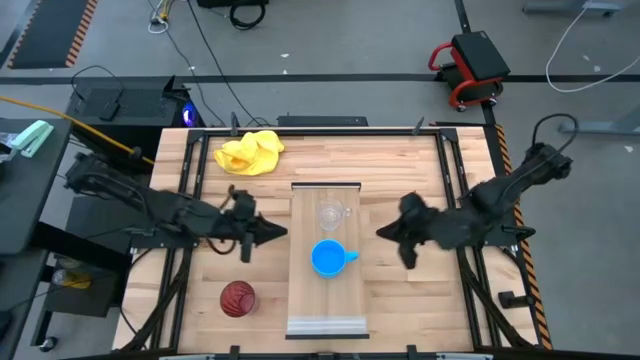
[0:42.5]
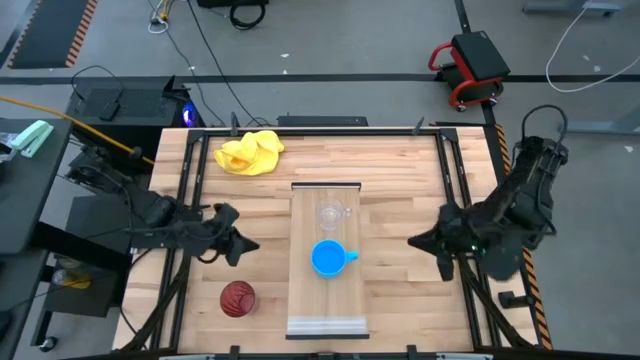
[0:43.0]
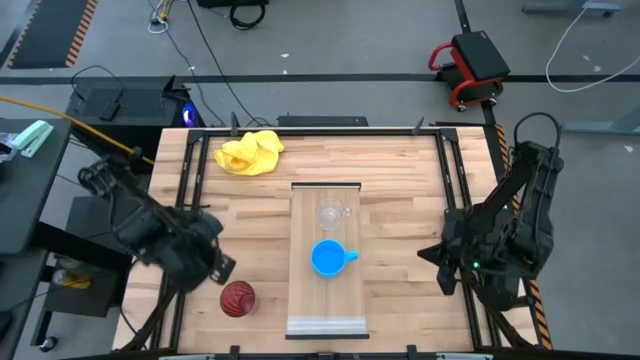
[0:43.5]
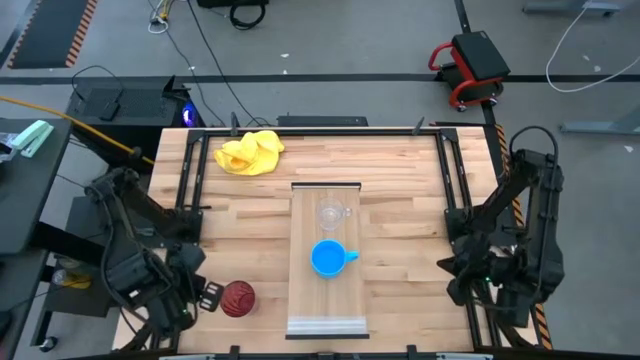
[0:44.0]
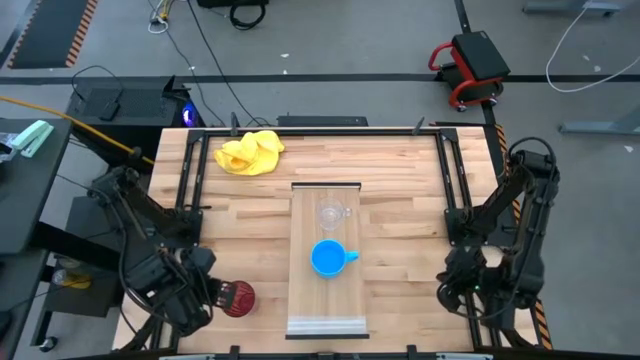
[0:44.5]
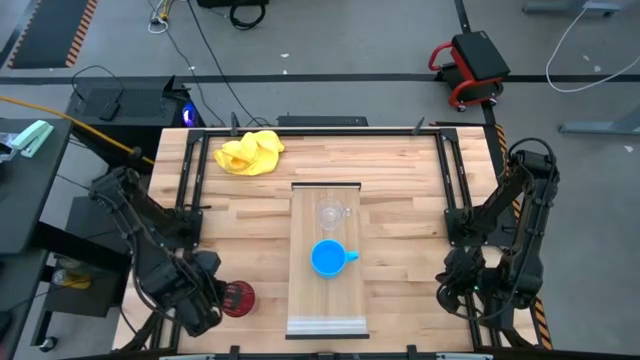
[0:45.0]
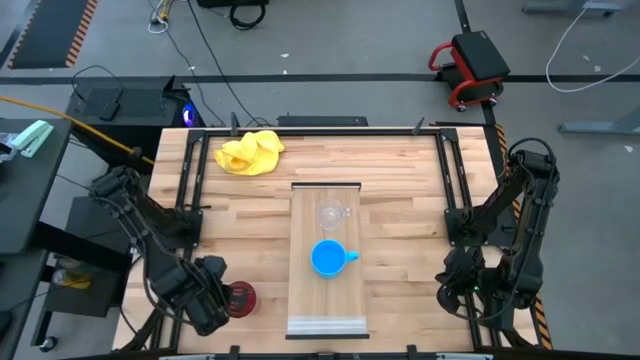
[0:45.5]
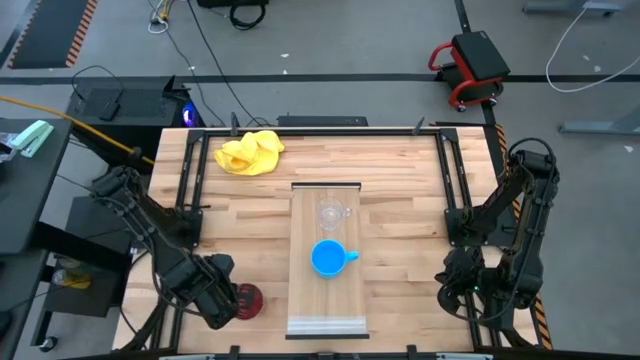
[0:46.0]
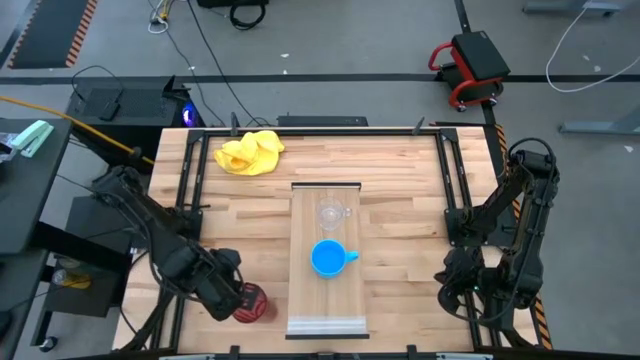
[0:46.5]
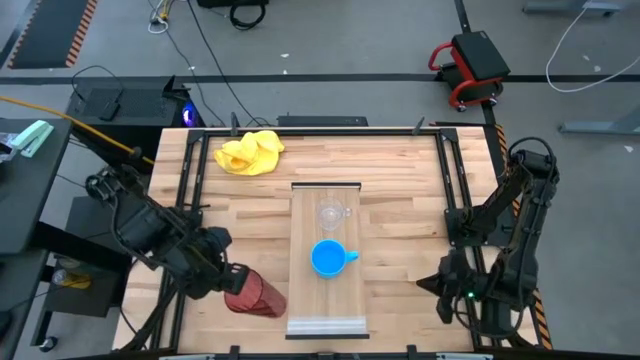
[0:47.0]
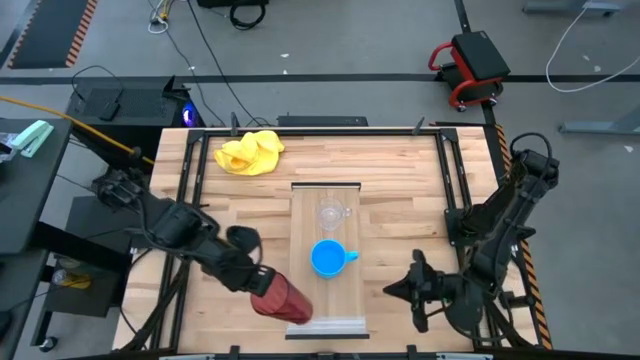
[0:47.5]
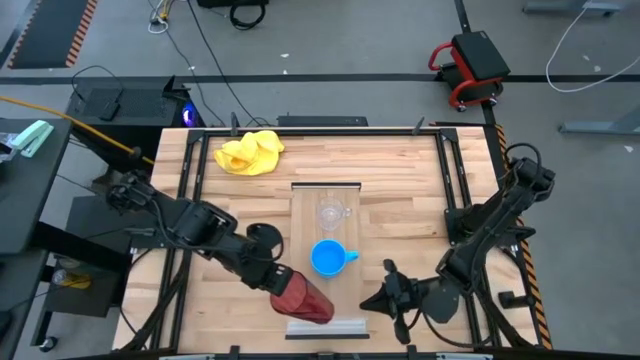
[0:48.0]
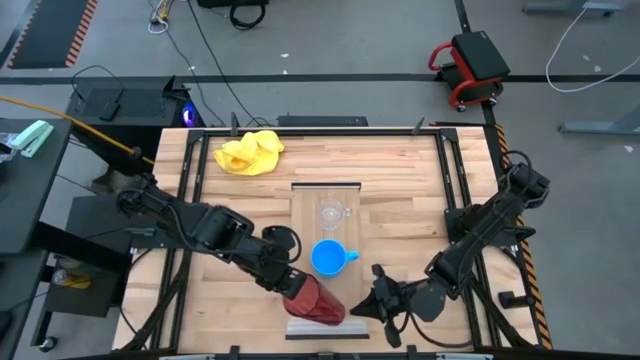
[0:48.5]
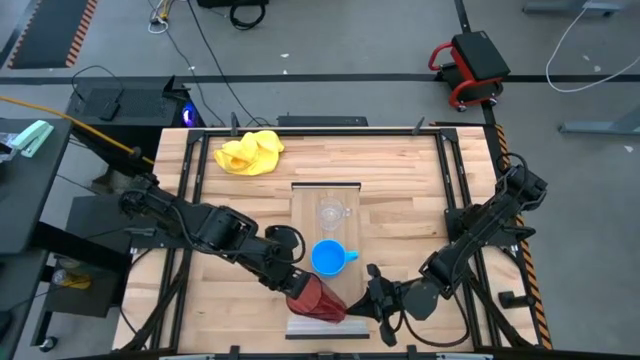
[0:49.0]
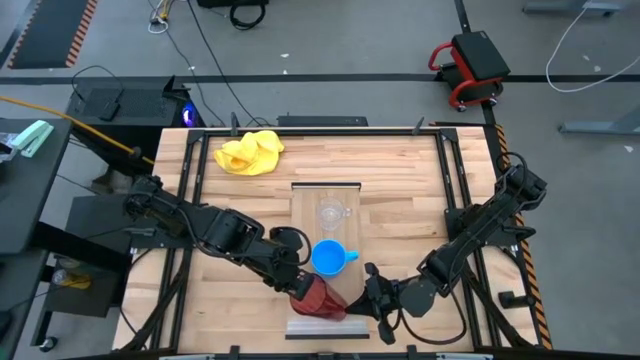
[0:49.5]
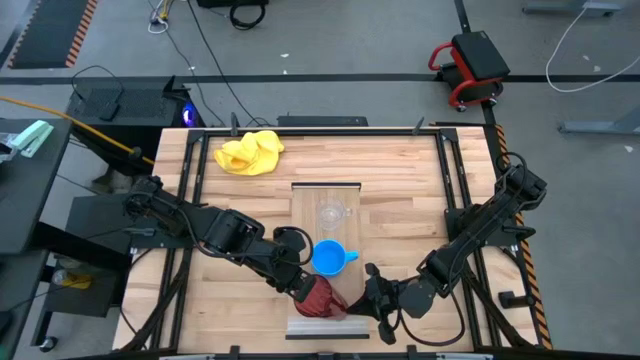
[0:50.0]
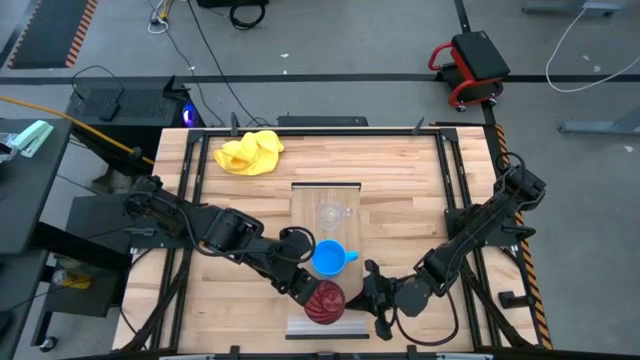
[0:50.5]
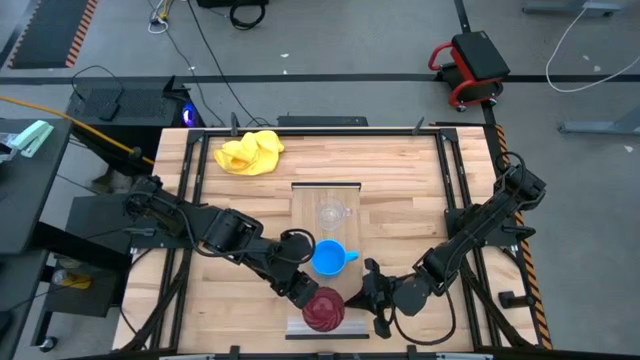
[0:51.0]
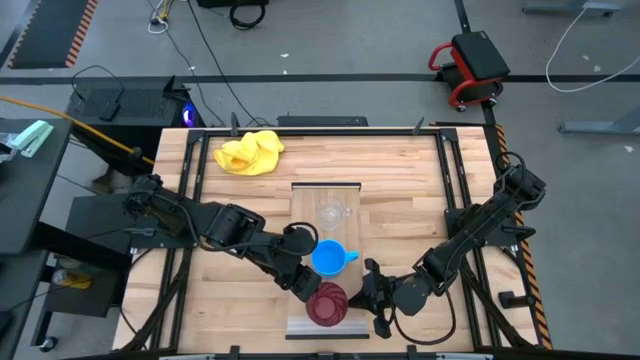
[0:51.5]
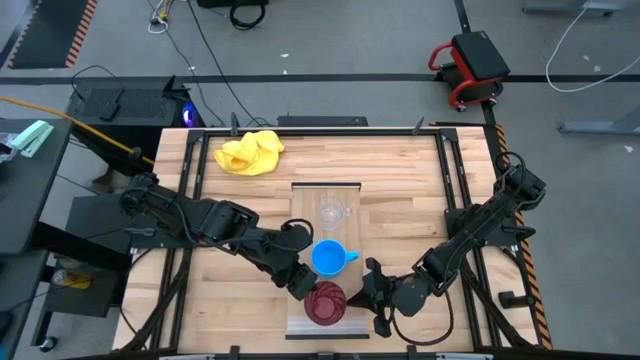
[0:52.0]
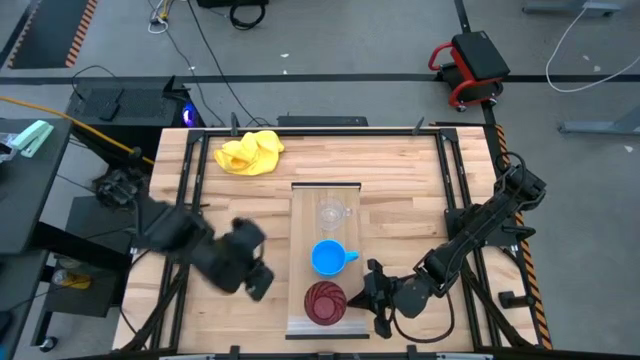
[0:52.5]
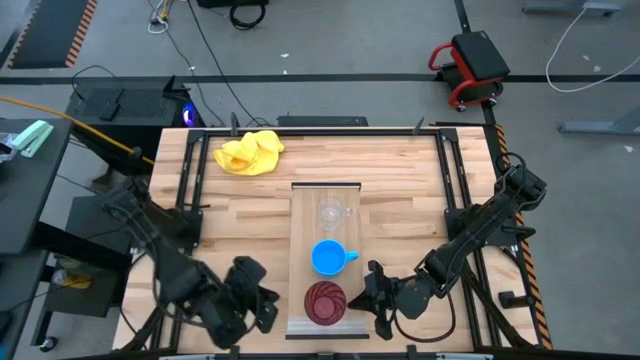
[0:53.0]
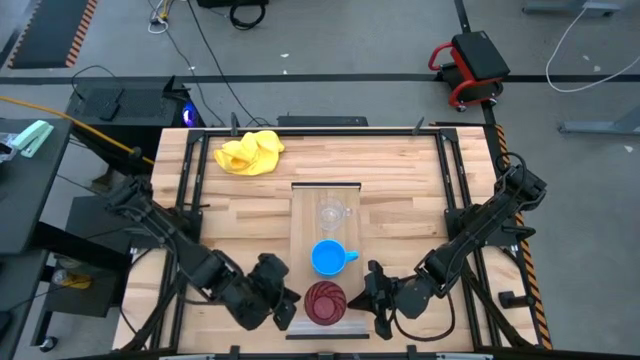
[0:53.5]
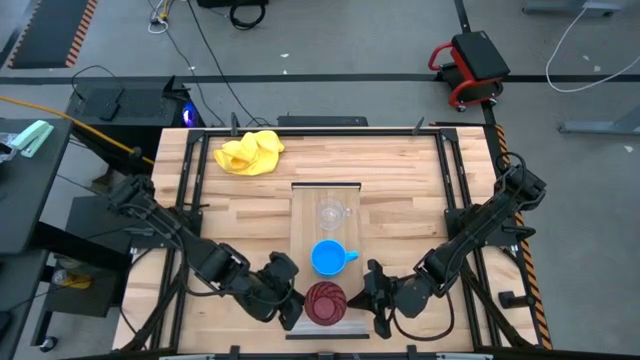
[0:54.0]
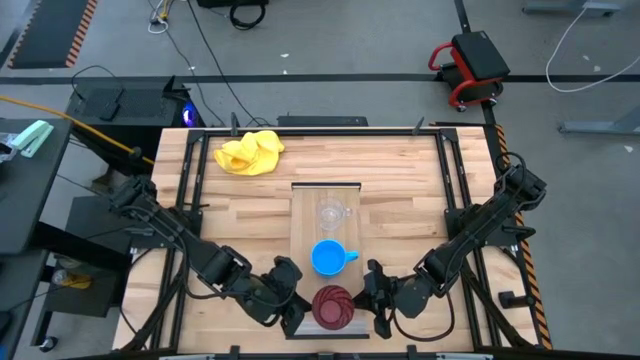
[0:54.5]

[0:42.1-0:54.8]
Task: Stack small to large cups/mugs on shelf
Put the red cup on the shelf

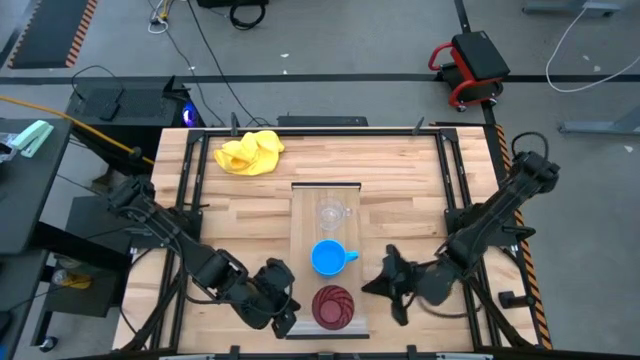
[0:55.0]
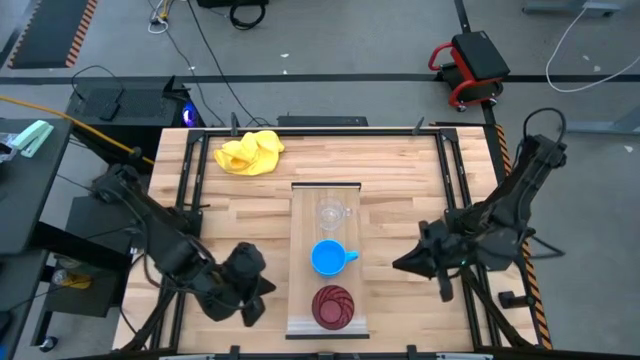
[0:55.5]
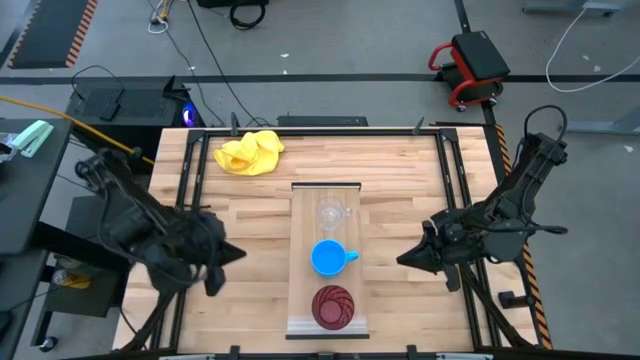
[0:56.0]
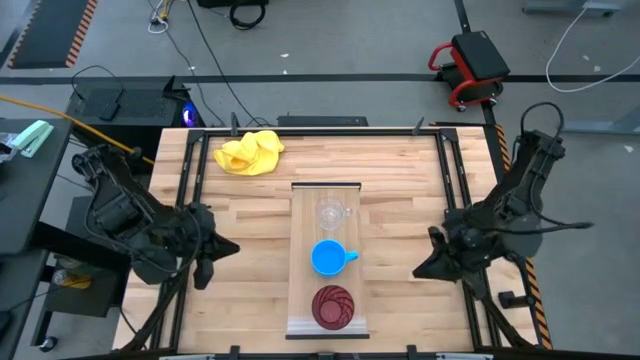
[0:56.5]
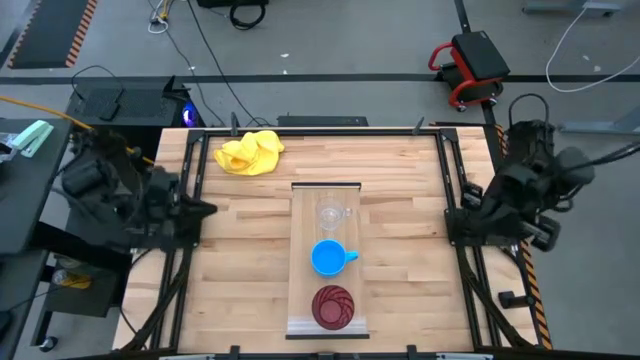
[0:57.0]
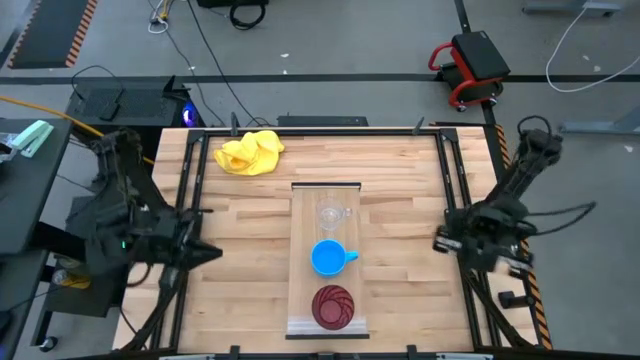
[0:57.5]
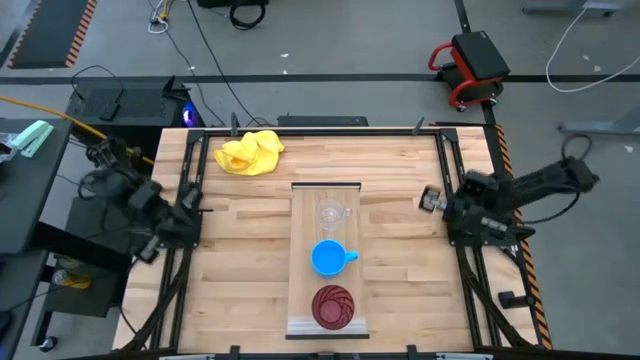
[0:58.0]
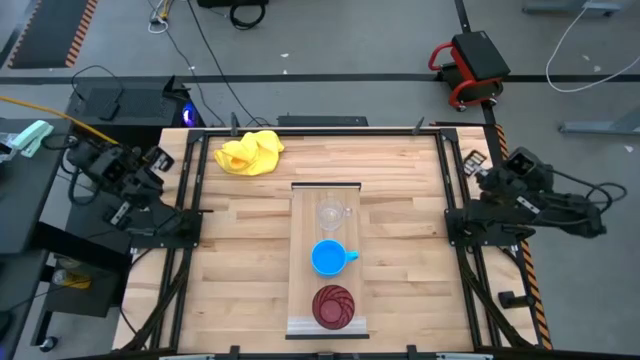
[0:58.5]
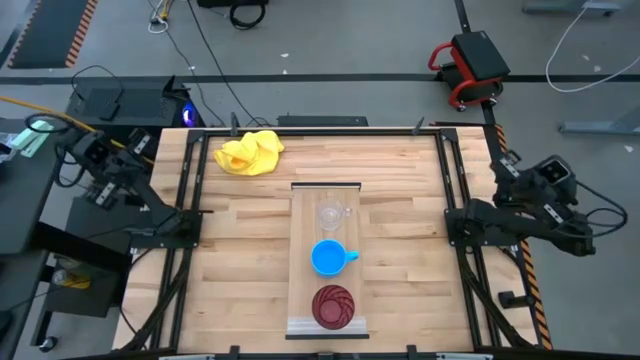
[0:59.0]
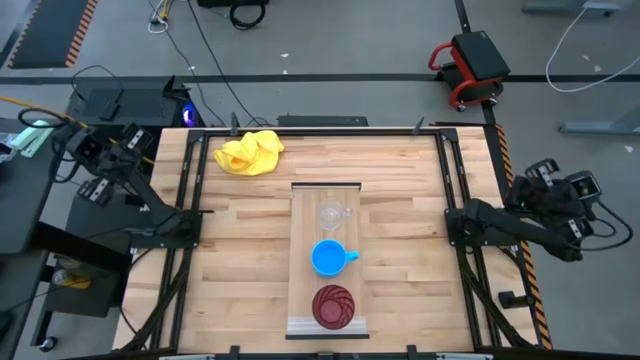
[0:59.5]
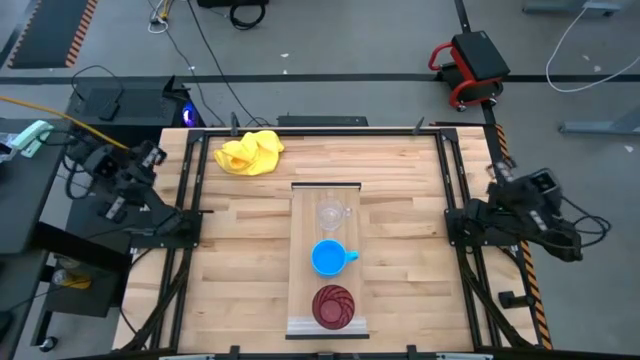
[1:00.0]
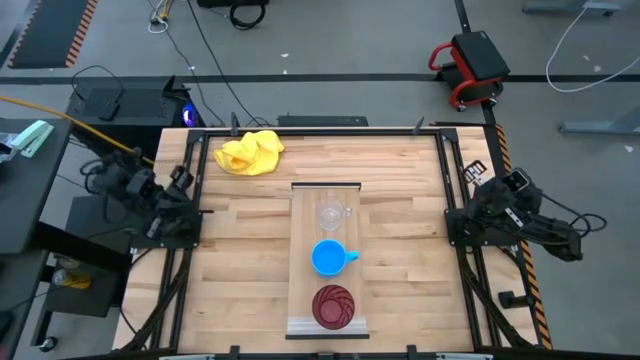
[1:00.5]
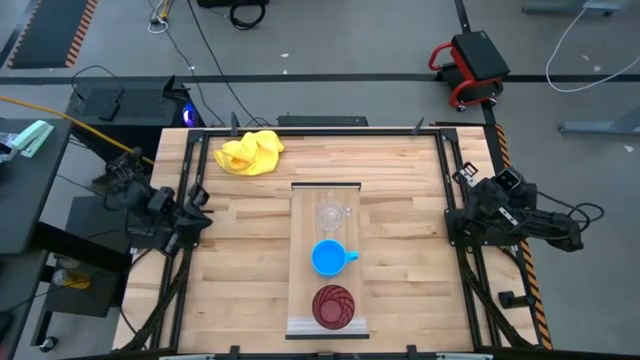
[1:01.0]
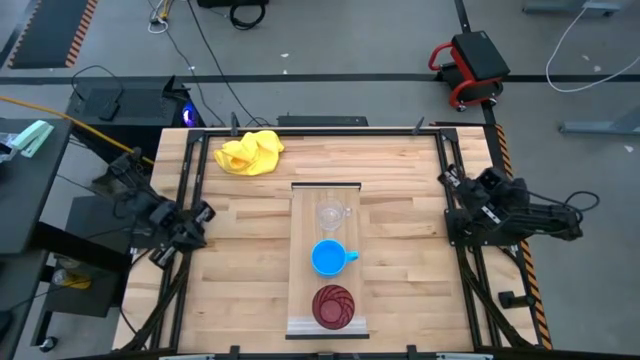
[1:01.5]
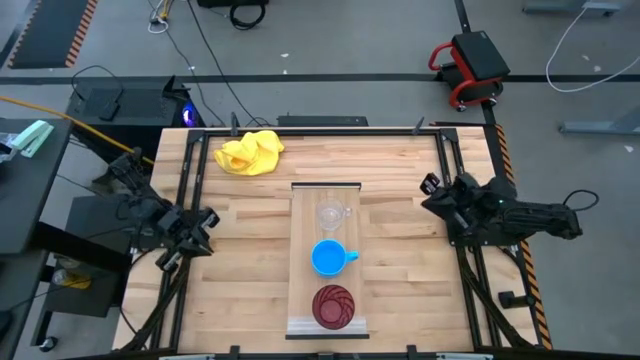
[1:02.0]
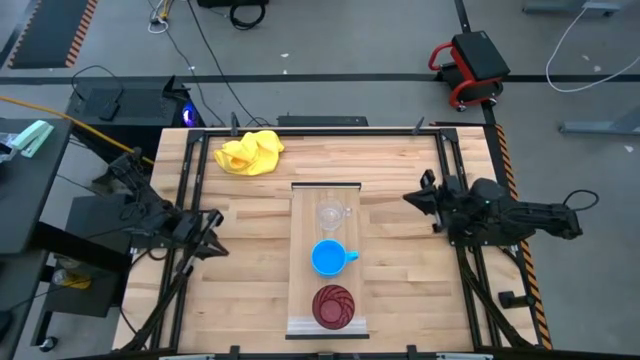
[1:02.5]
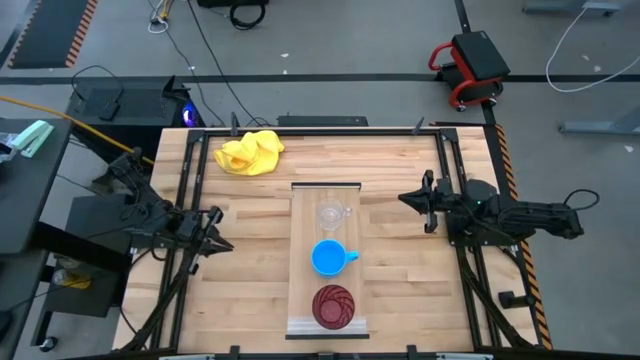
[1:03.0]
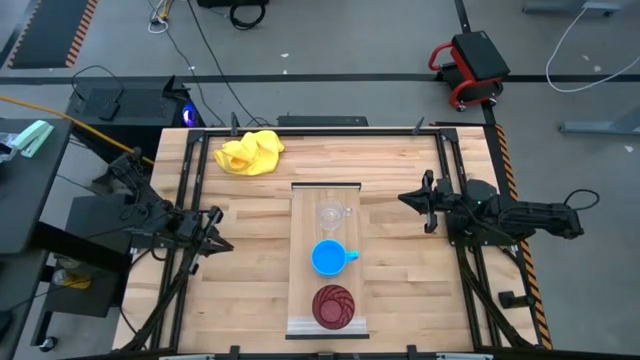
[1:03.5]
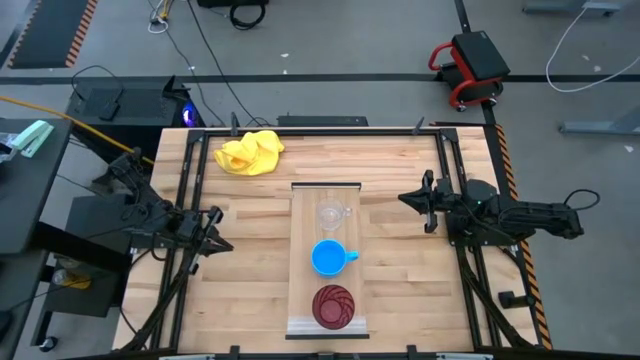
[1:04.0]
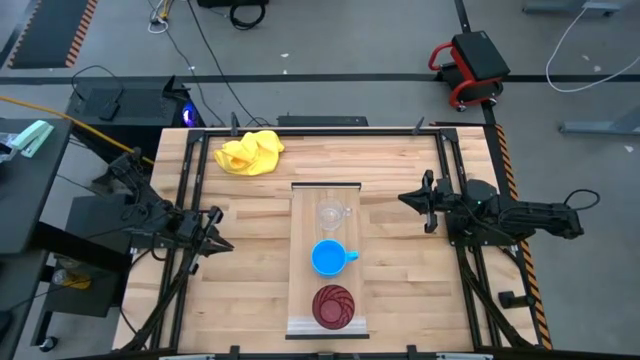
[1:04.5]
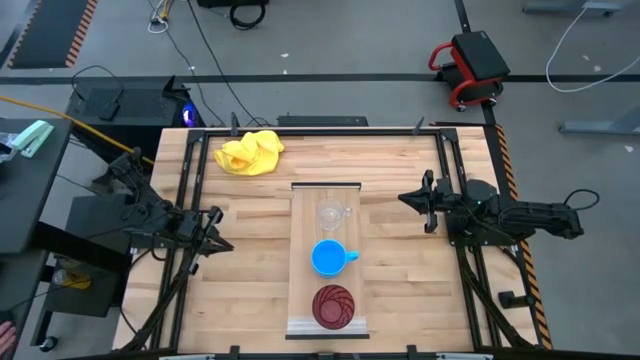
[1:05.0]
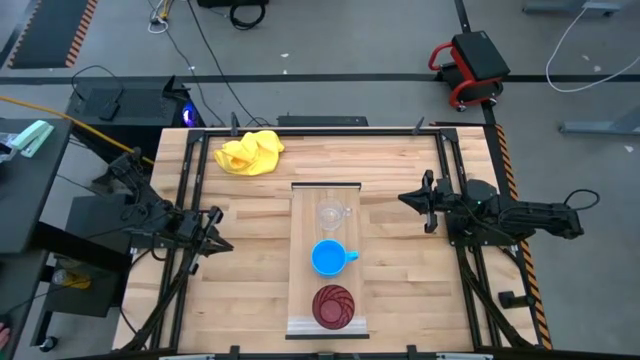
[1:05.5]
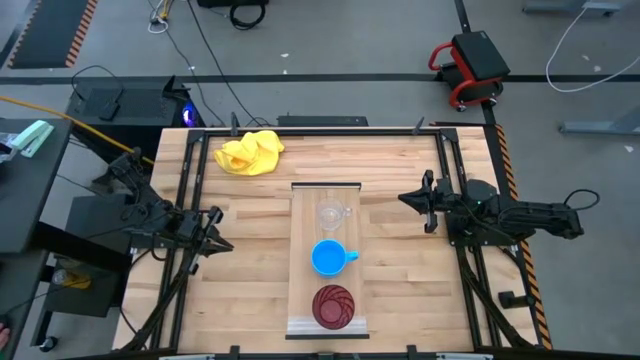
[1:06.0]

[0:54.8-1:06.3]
Return to Home Position
